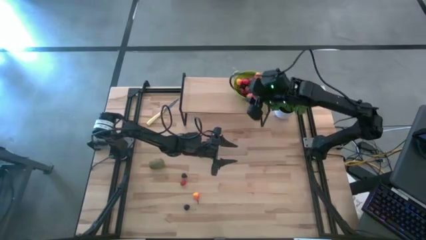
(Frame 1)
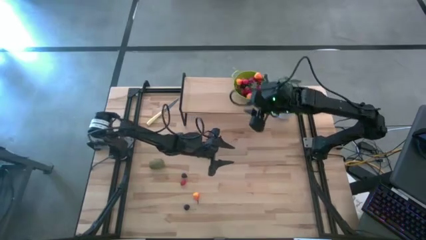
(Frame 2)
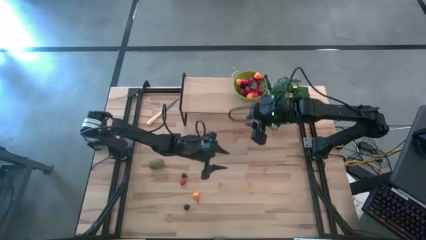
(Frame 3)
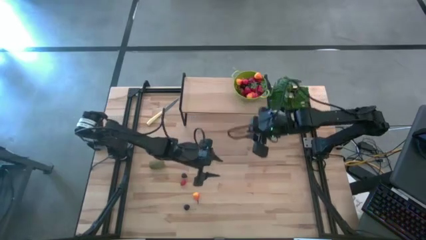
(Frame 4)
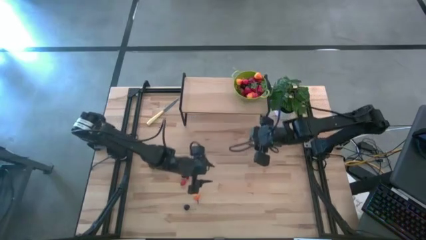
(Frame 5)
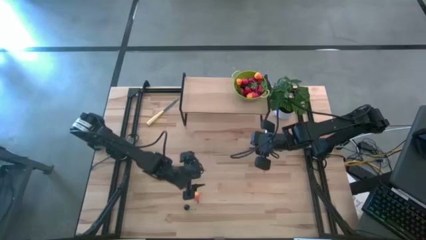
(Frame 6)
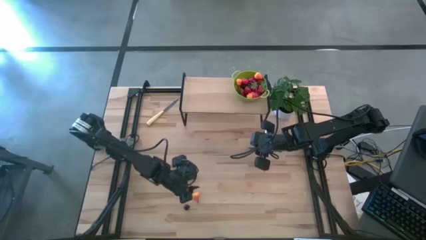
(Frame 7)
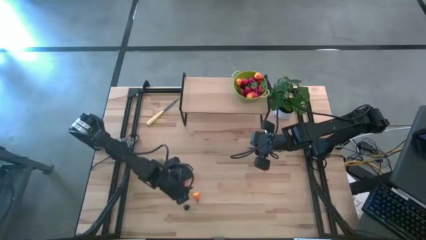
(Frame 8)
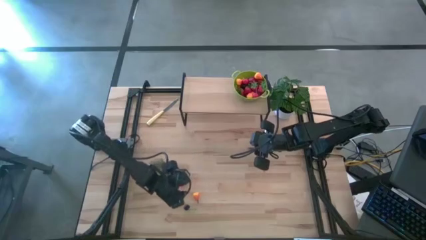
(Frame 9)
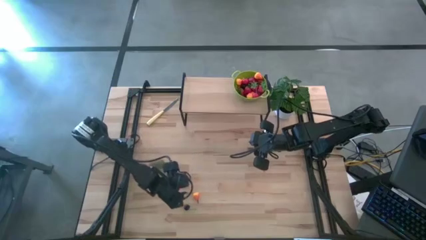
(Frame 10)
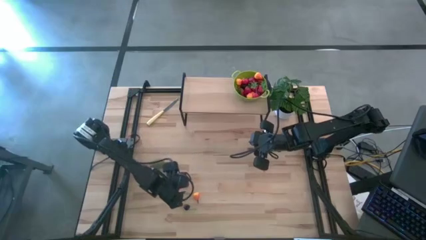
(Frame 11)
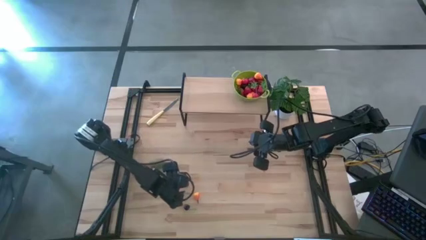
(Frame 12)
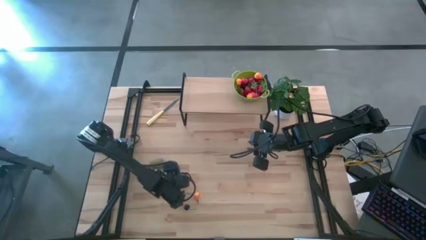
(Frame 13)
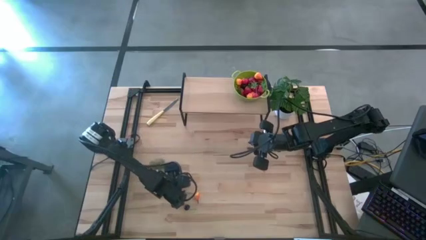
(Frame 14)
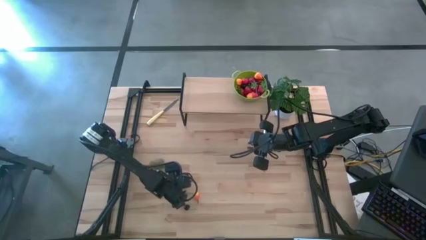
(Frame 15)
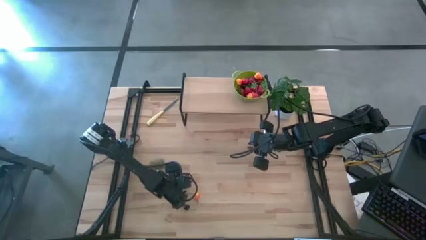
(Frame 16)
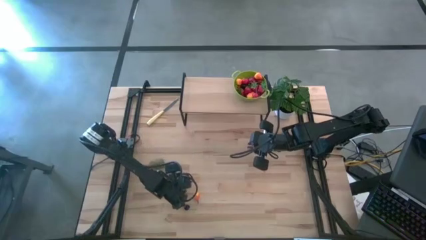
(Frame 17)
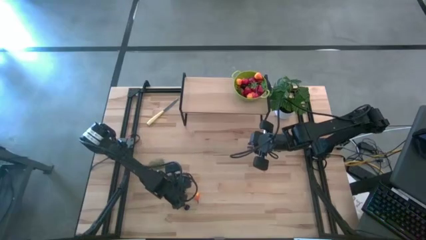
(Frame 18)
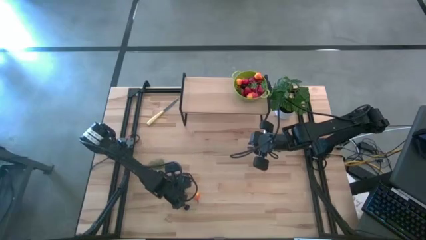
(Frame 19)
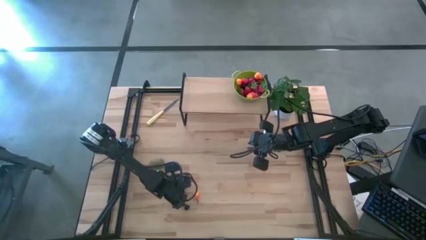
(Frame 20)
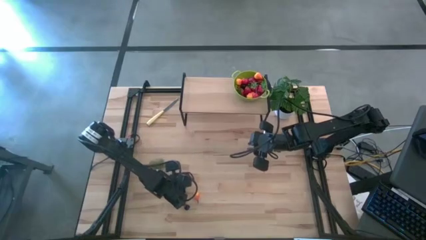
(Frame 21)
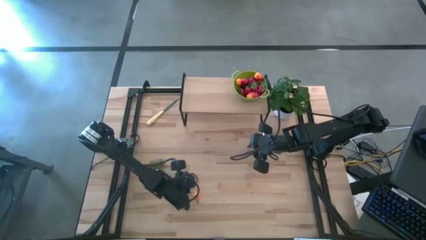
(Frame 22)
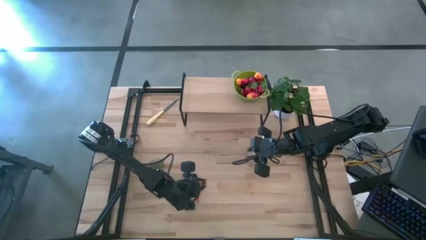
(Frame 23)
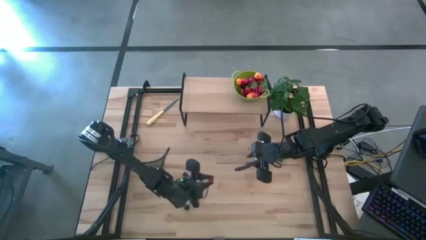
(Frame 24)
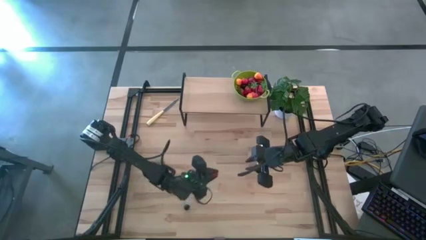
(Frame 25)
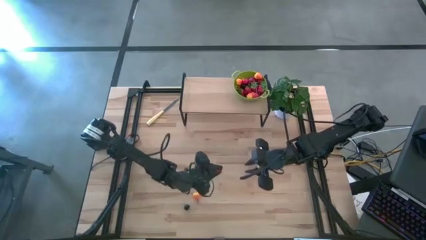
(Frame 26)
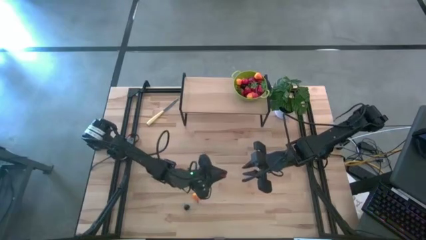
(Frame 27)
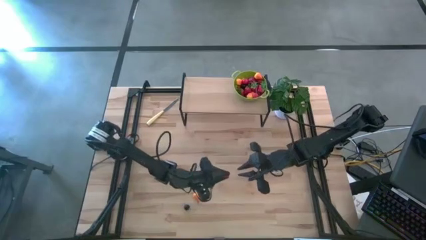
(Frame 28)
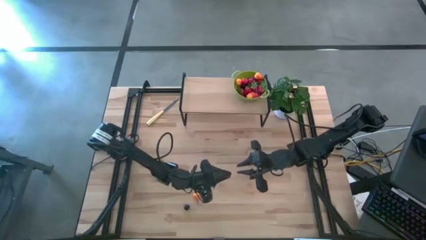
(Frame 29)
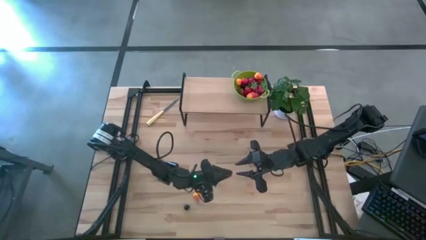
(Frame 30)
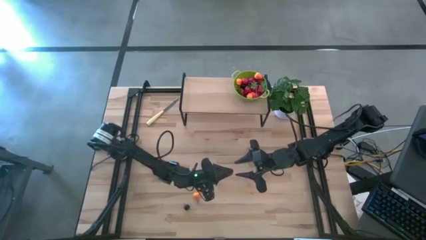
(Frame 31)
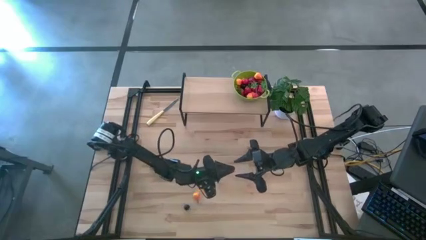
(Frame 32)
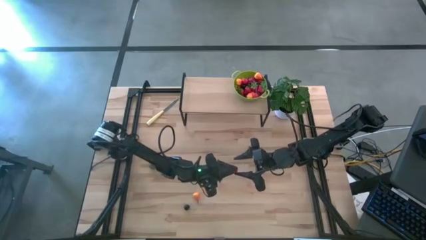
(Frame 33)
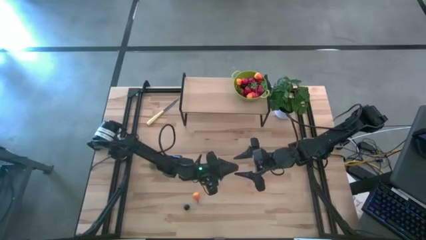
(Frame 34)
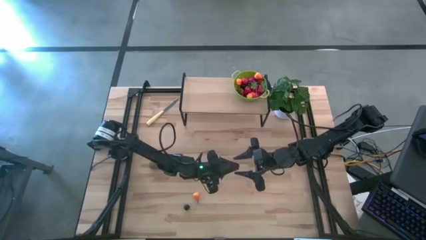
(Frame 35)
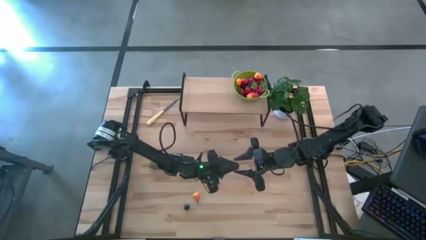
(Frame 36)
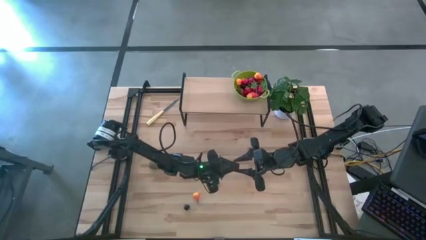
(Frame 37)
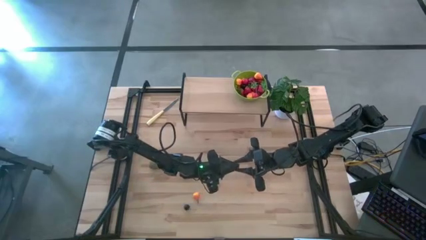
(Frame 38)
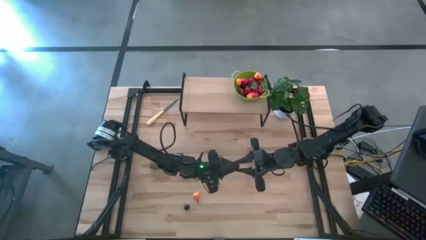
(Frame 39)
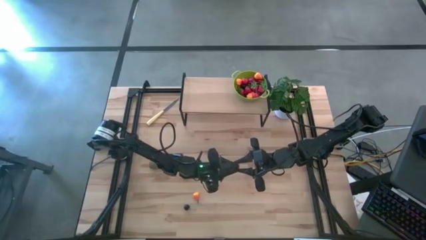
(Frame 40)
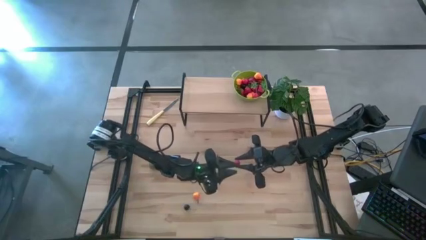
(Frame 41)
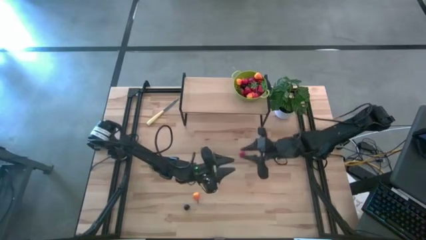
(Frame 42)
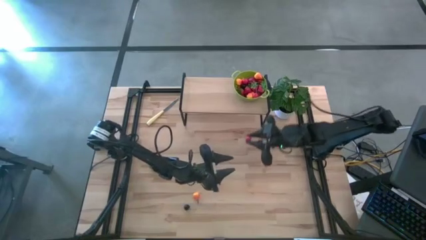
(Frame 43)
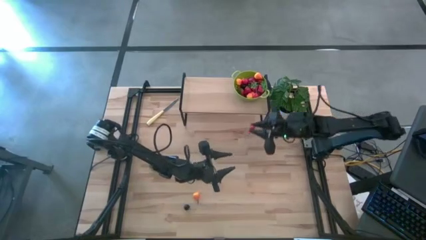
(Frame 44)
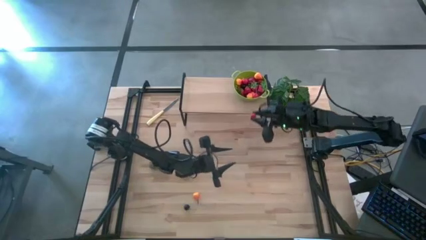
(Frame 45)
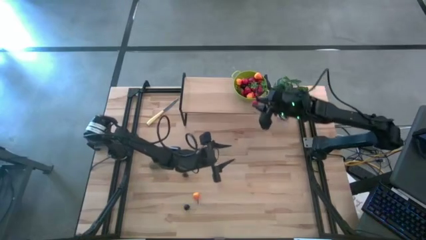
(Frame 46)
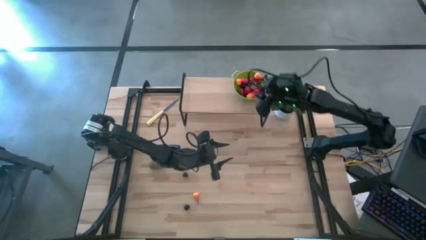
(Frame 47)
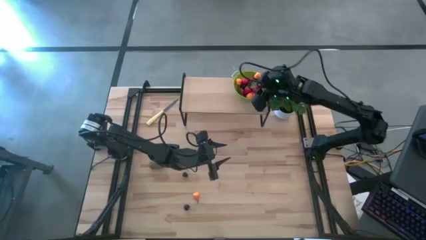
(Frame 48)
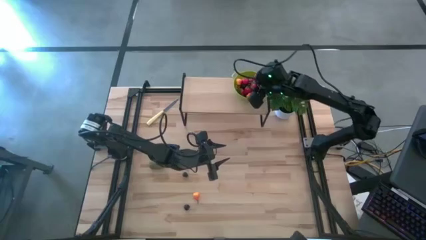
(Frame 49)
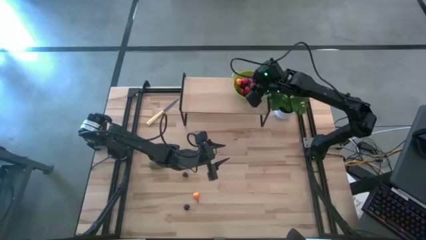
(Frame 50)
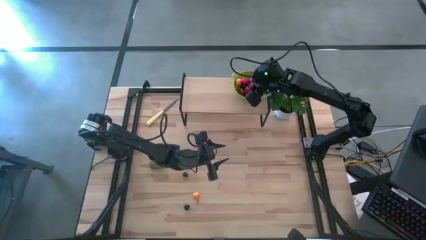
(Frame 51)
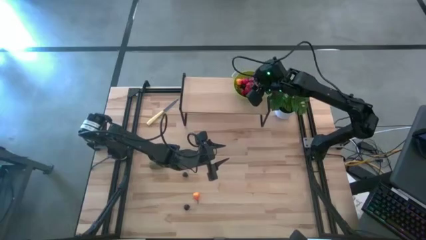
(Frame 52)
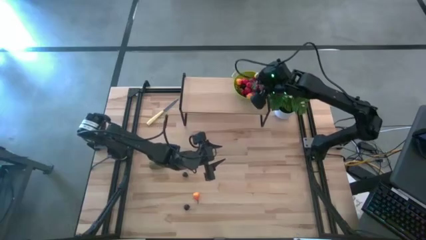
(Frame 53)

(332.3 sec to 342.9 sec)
Task: Build produce basket
Put the raspberry into the green basket

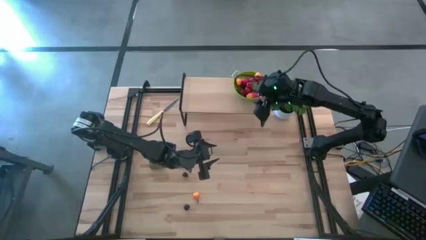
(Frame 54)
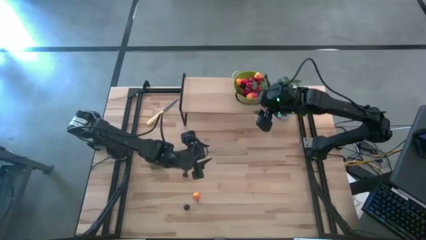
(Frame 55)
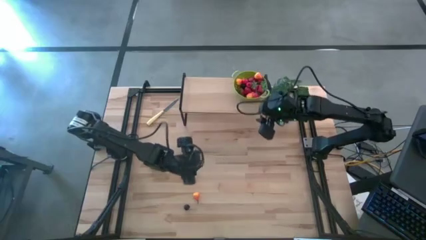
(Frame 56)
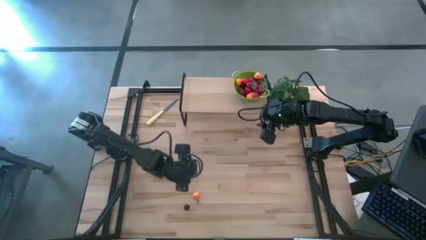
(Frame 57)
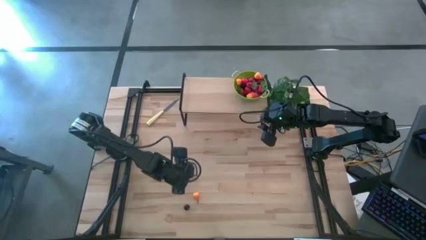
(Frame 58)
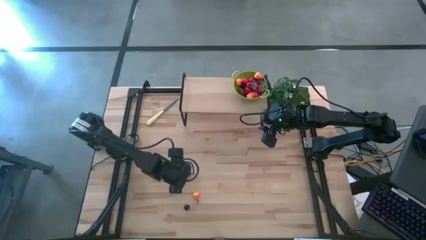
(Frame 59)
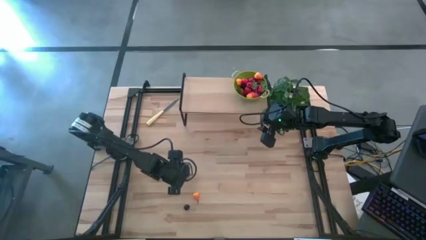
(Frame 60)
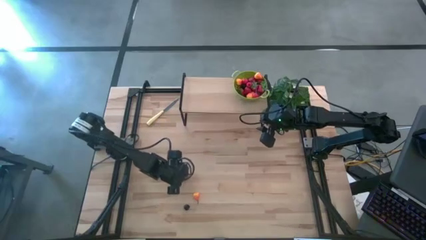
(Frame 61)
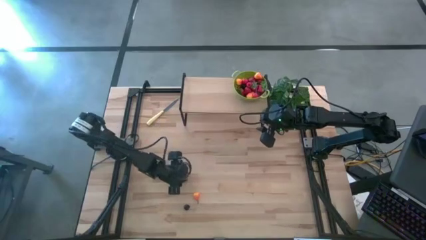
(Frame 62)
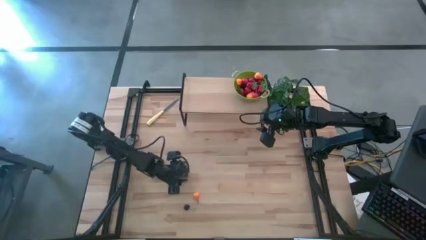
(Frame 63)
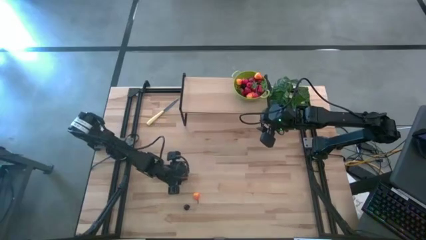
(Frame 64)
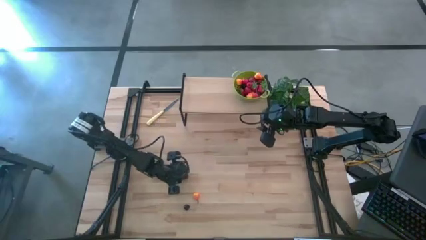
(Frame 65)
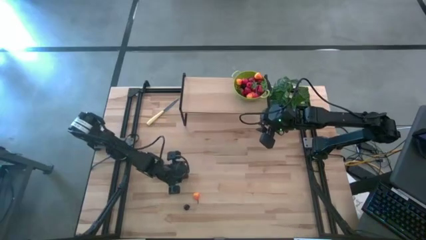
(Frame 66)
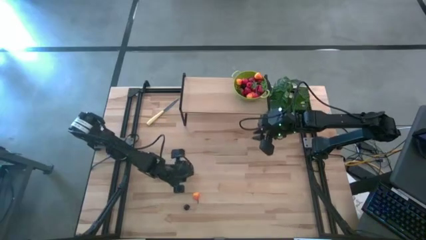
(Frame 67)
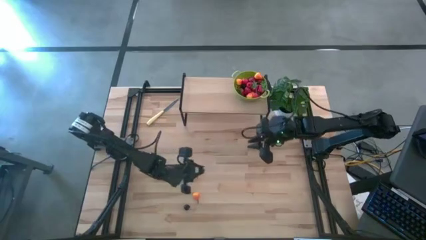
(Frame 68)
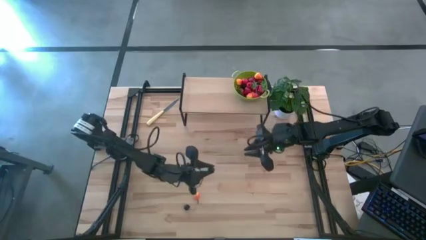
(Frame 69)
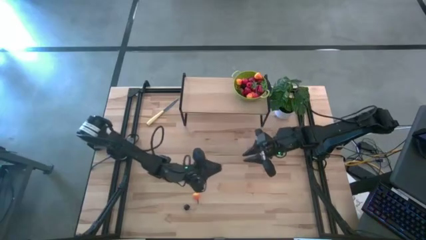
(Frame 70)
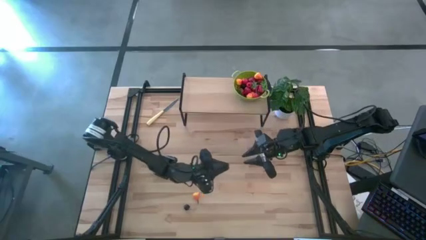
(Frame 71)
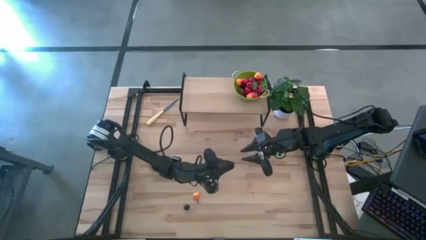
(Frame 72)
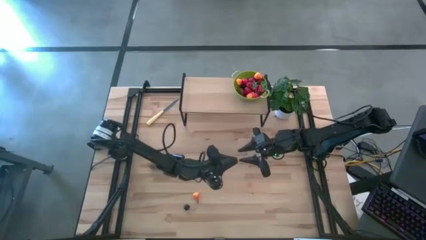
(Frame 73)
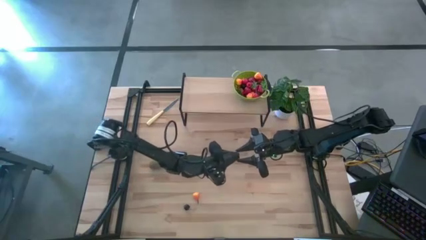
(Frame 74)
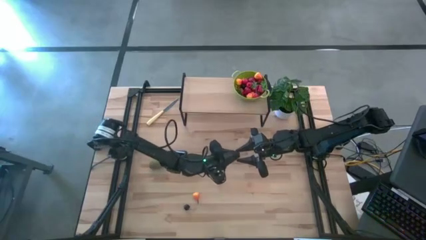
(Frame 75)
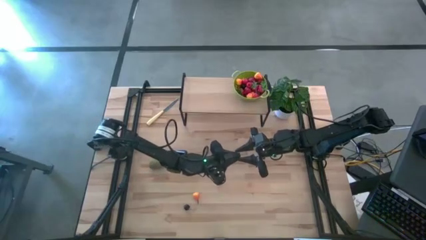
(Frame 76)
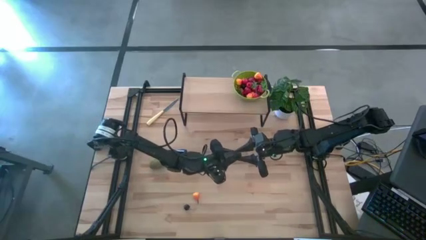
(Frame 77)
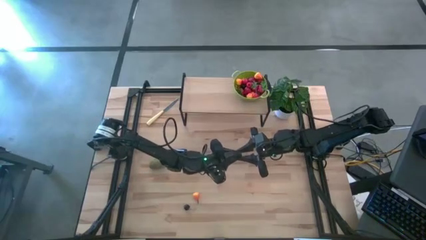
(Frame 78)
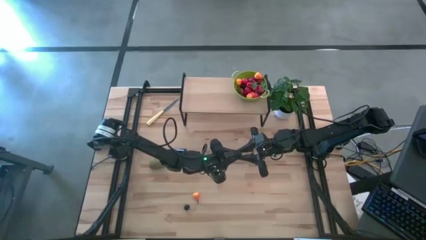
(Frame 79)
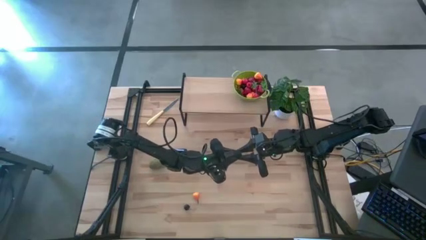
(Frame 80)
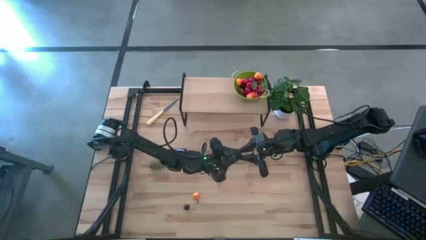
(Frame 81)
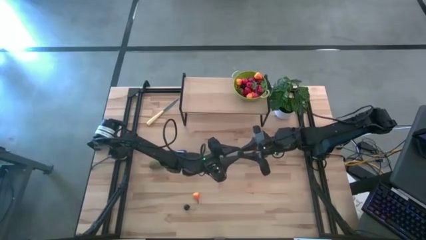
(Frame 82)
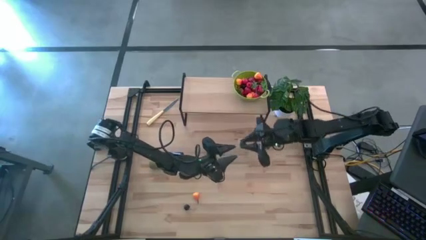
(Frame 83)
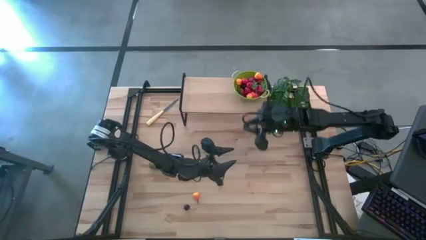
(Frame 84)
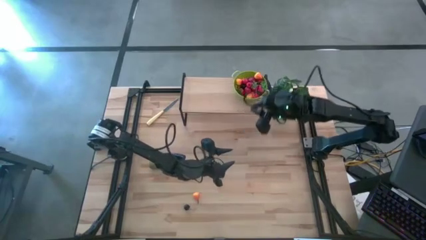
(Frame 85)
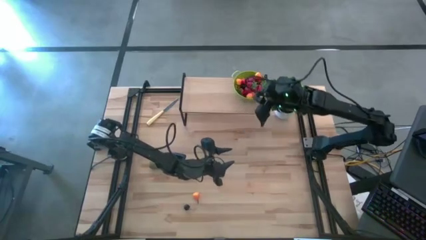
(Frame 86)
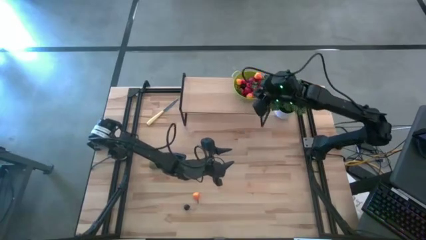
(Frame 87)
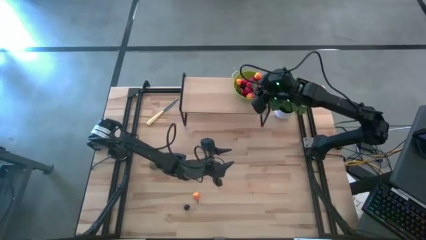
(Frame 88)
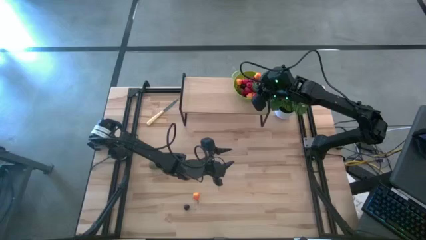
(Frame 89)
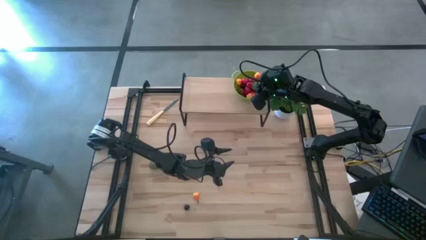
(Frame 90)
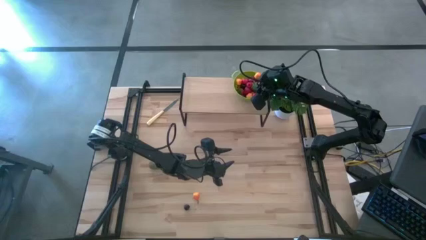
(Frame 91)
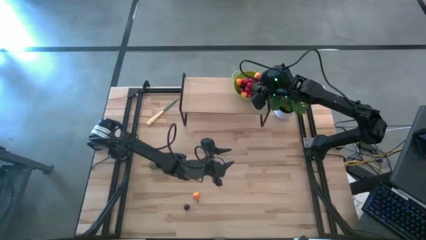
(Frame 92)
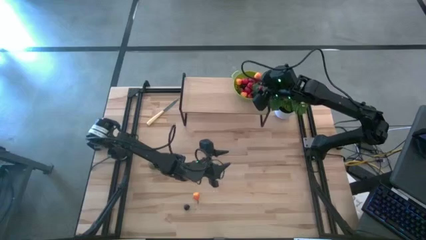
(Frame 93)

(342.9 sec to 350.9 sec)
Put the blackberry into the green basket
